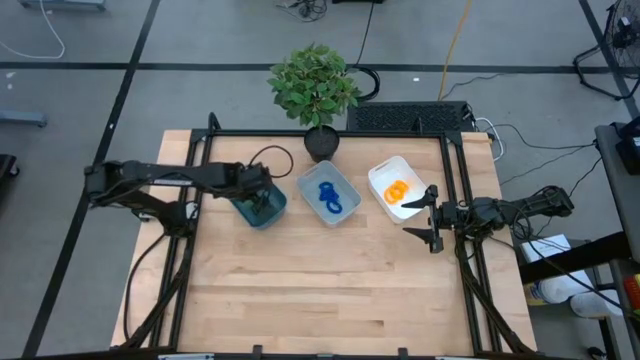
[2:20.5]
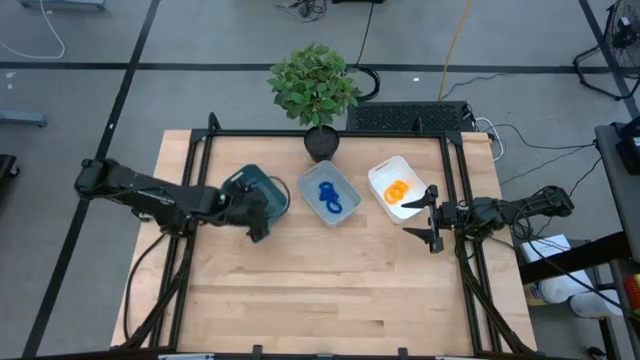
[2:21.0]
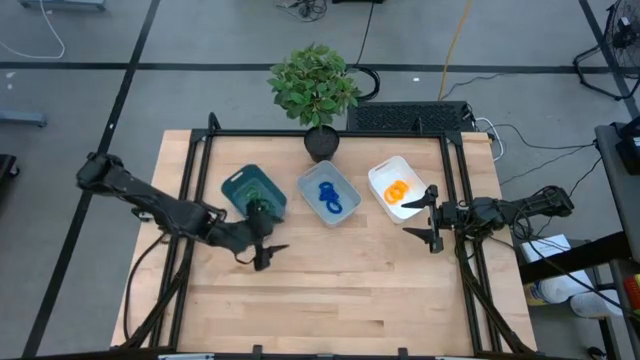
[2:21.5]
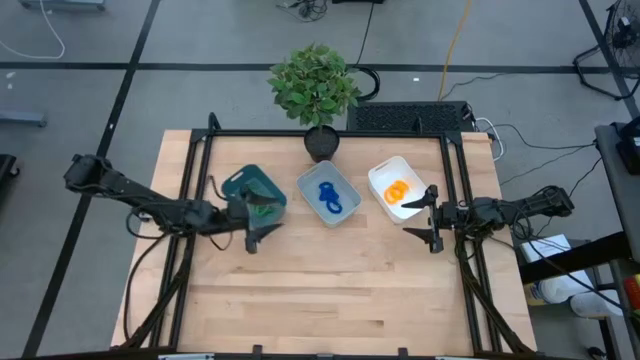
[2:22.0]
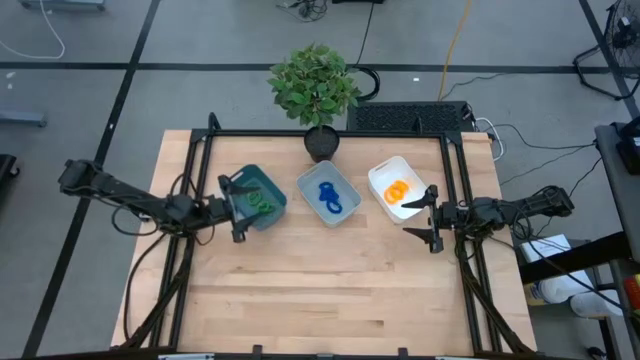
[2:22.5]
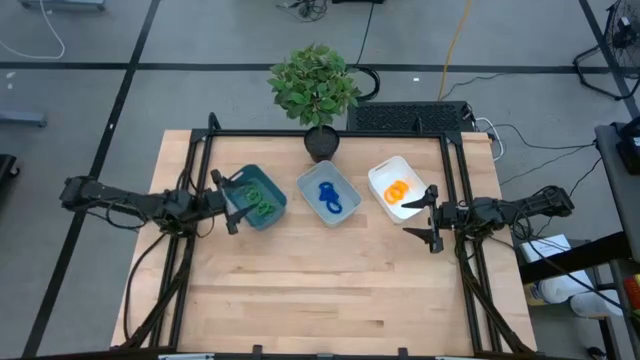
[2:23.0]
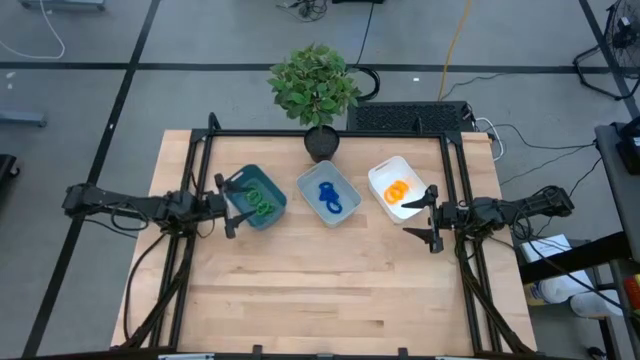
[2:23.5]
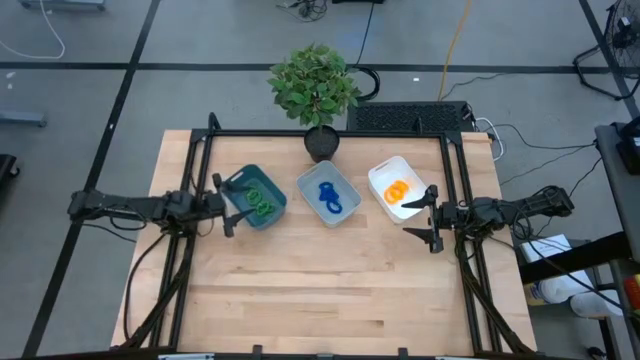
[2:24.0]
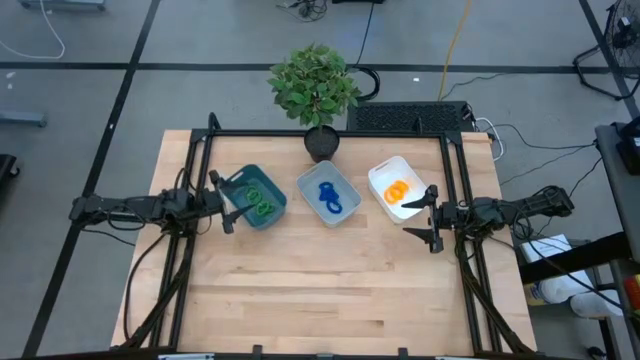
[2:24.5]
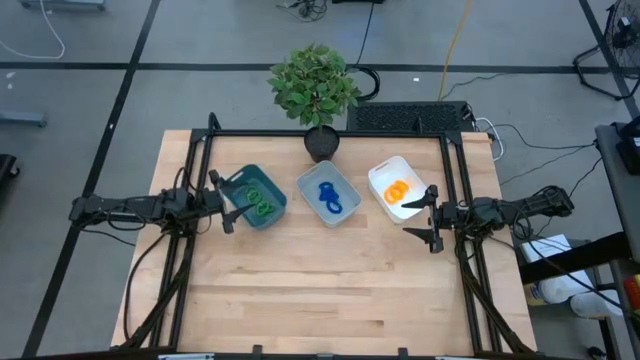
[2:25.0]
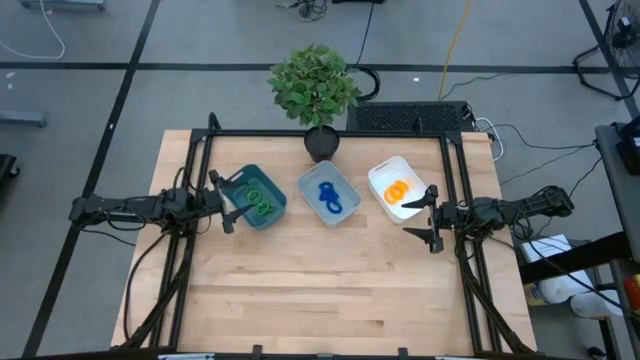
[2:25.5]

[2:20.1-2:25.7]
Task: Sort spring keychains
Return to Home Position

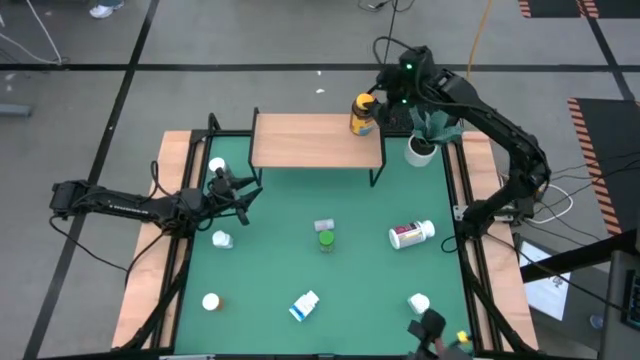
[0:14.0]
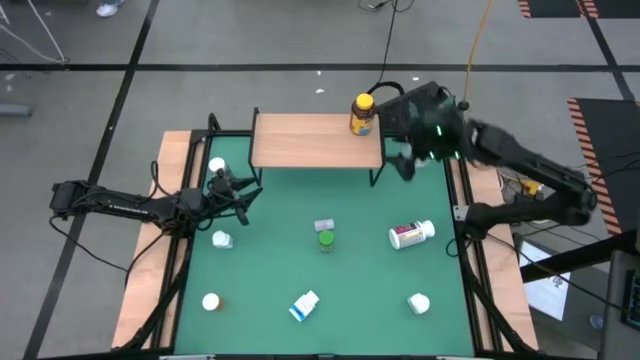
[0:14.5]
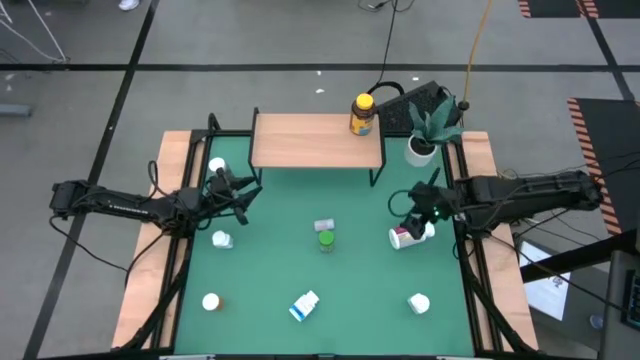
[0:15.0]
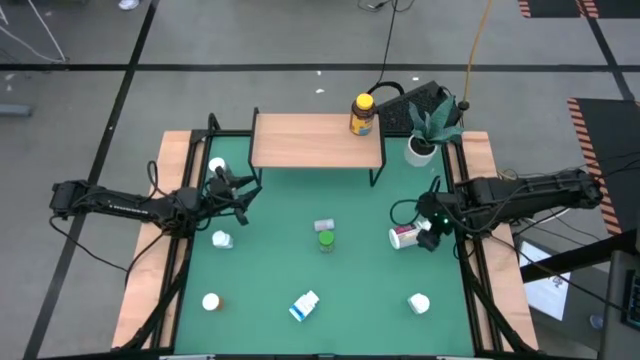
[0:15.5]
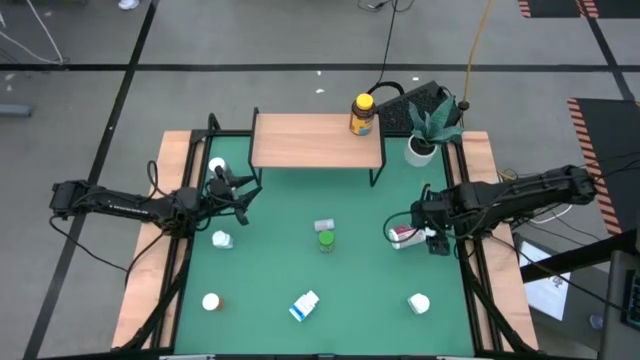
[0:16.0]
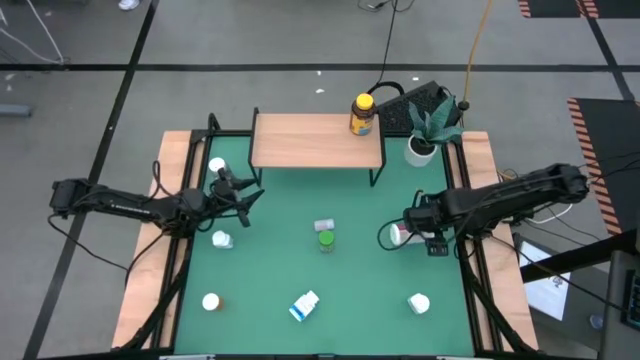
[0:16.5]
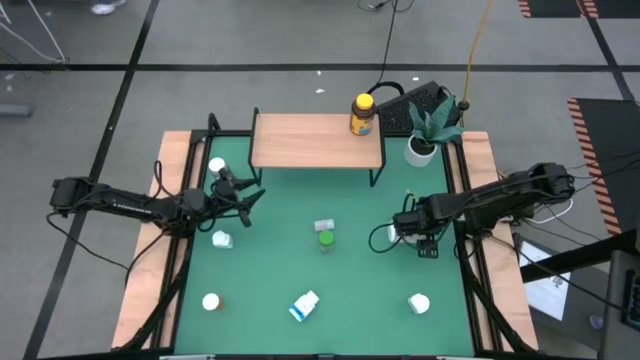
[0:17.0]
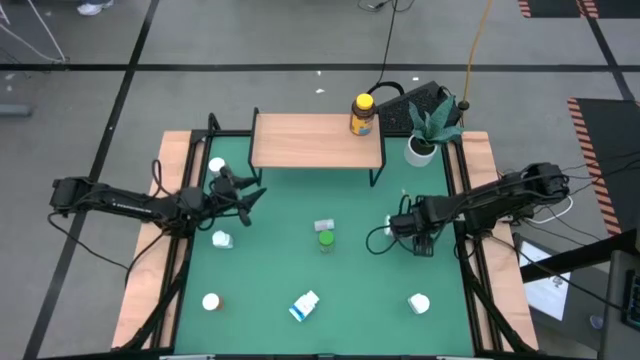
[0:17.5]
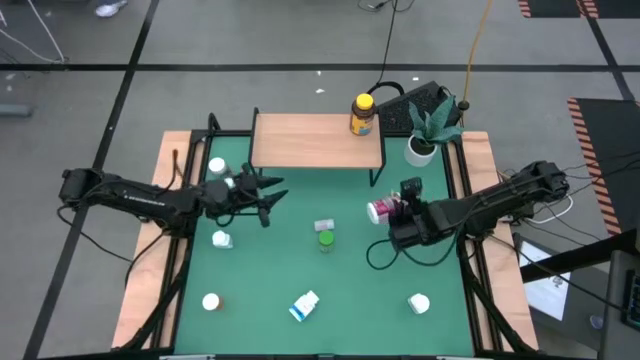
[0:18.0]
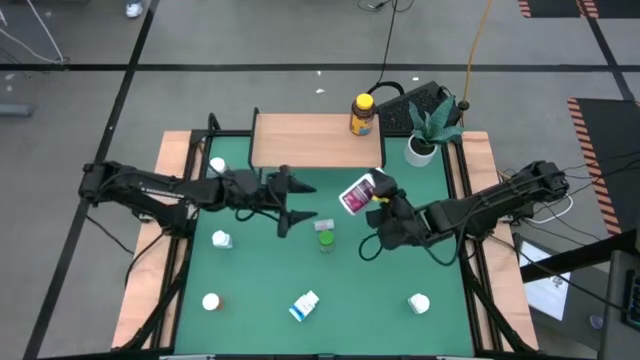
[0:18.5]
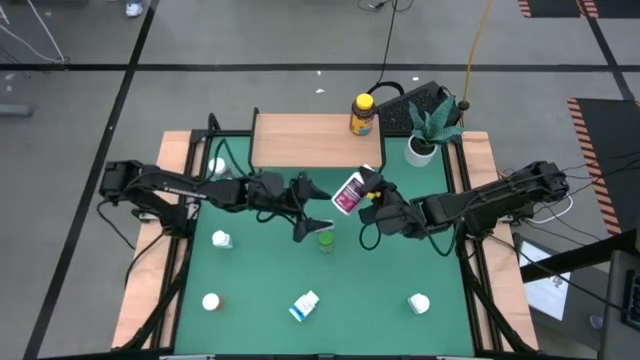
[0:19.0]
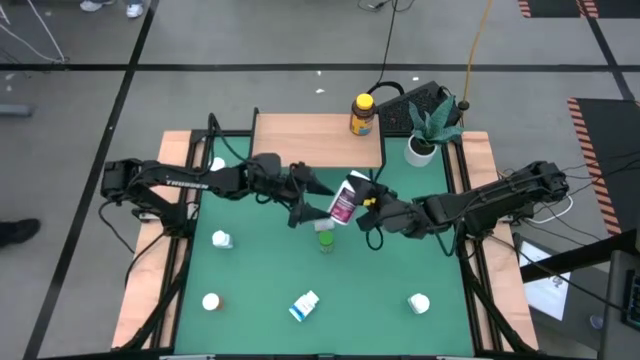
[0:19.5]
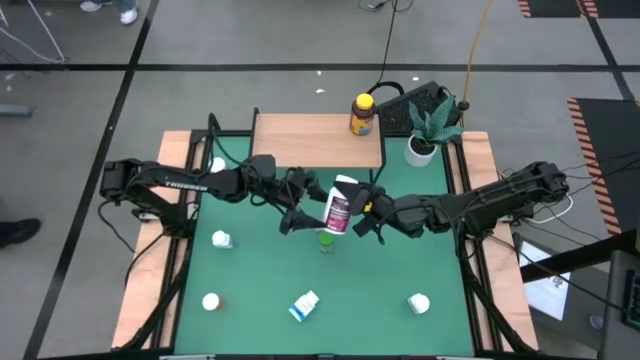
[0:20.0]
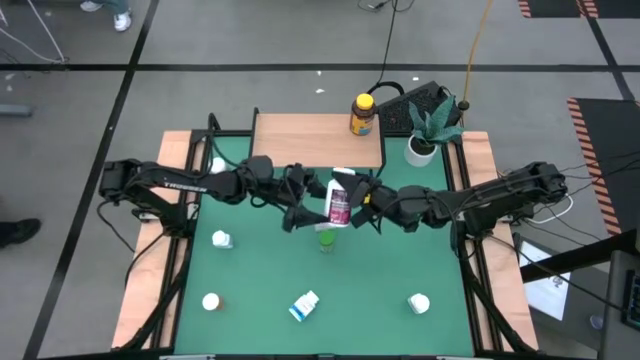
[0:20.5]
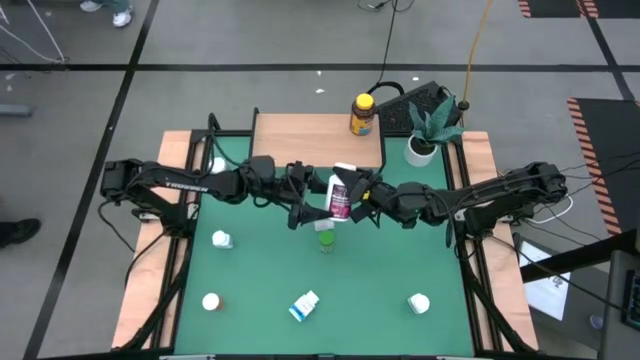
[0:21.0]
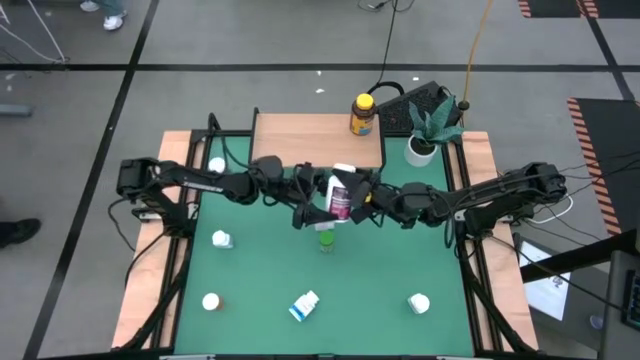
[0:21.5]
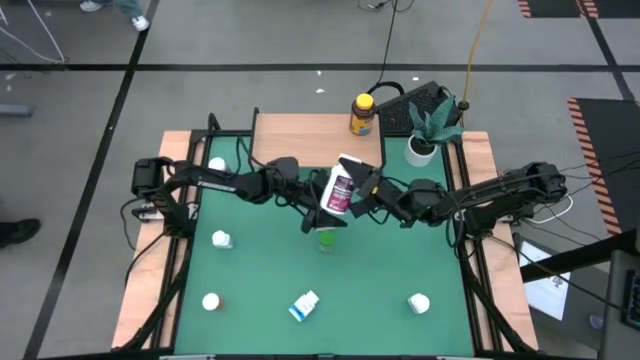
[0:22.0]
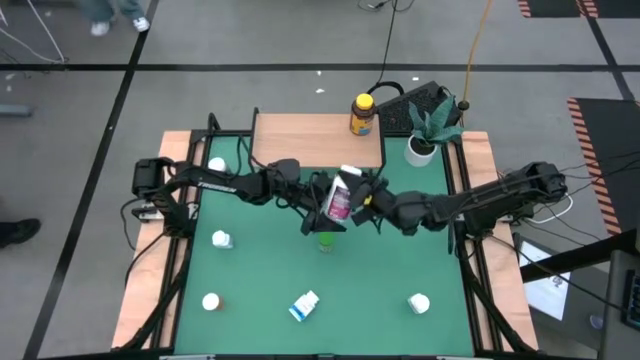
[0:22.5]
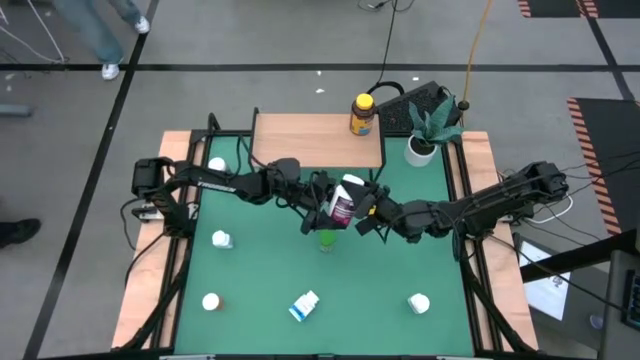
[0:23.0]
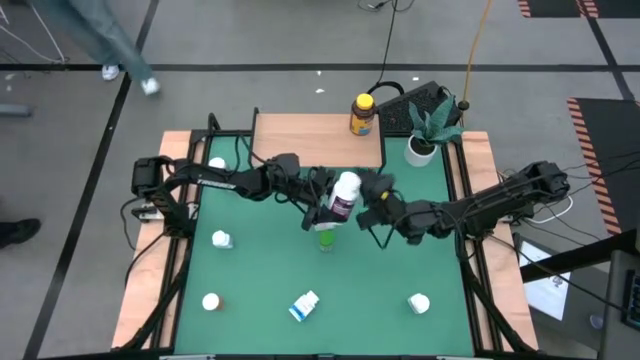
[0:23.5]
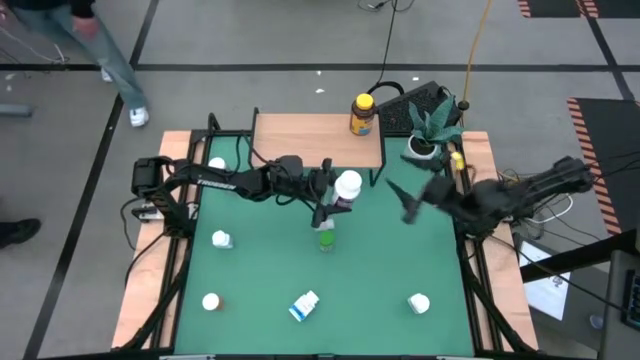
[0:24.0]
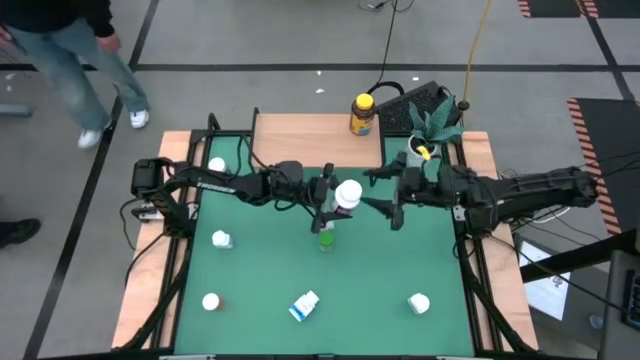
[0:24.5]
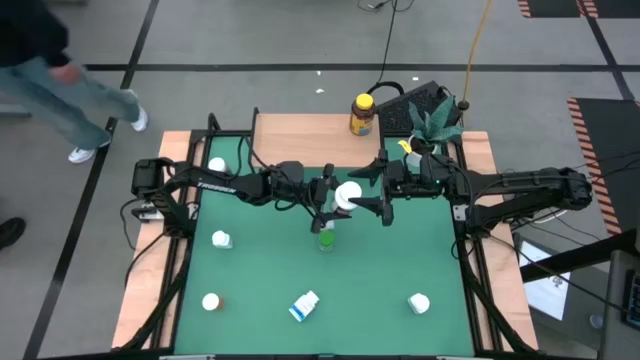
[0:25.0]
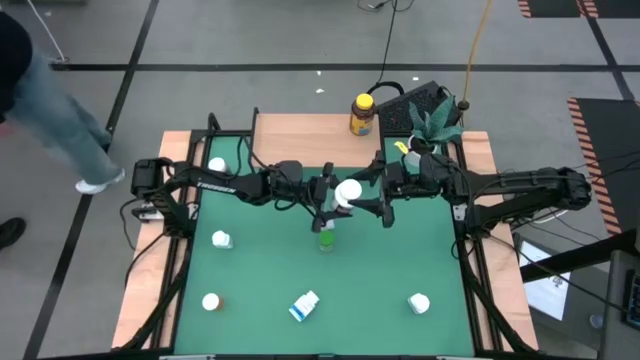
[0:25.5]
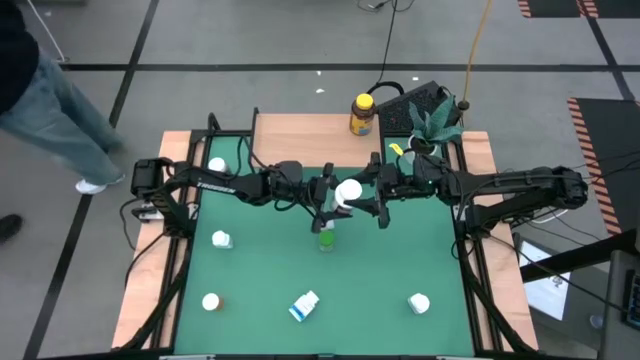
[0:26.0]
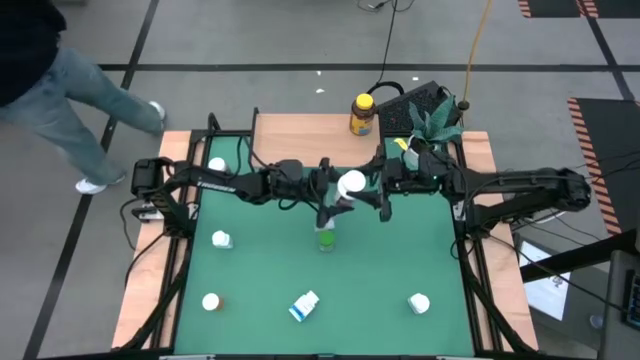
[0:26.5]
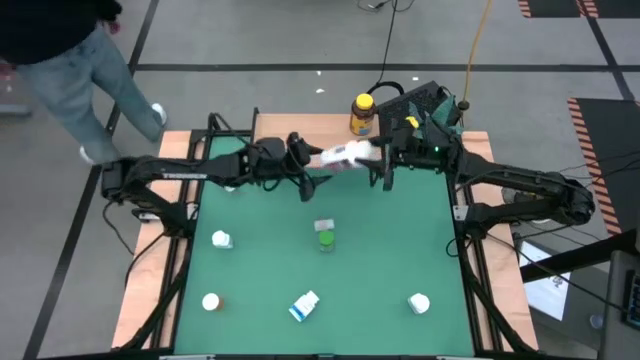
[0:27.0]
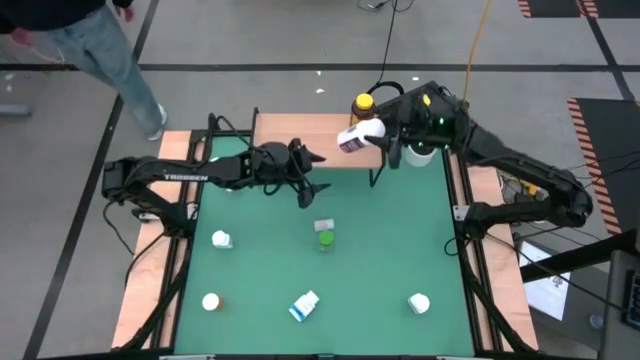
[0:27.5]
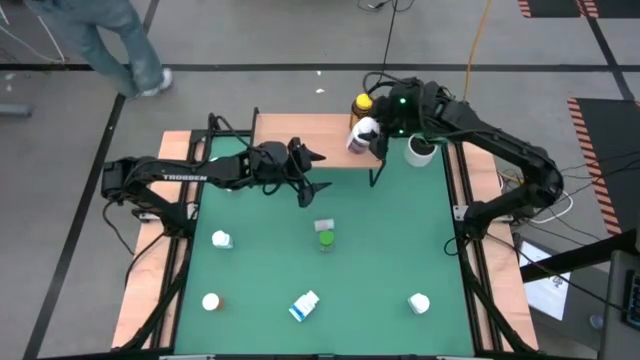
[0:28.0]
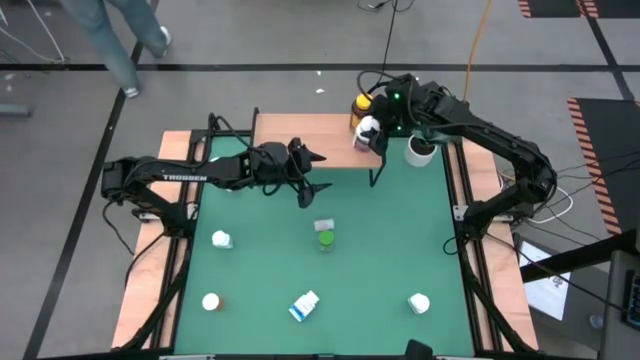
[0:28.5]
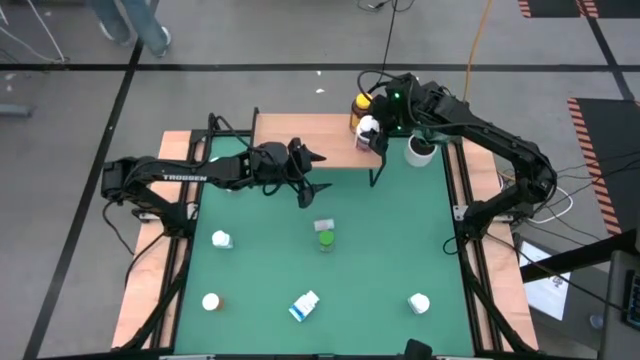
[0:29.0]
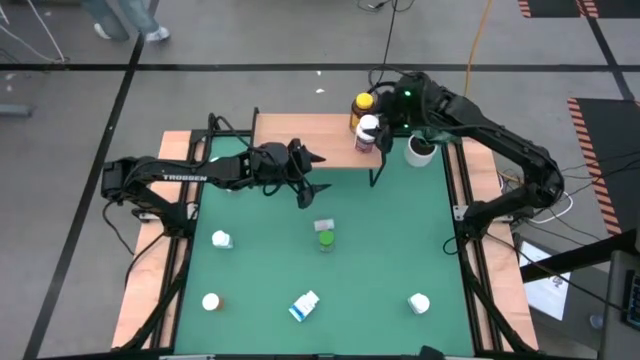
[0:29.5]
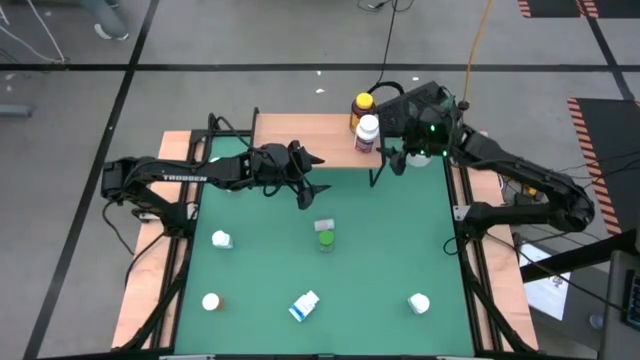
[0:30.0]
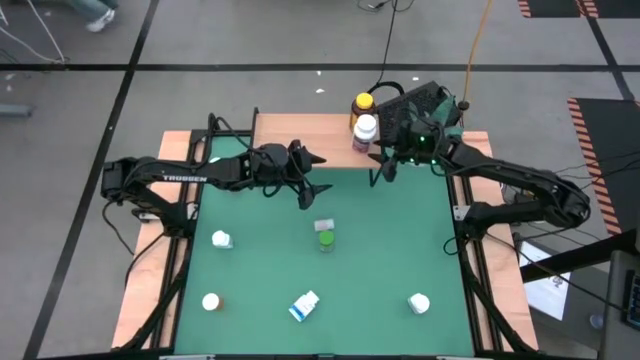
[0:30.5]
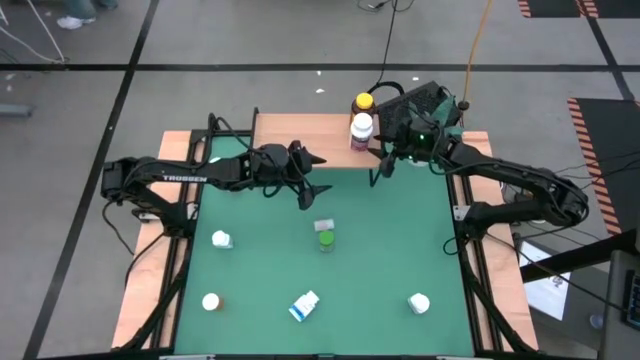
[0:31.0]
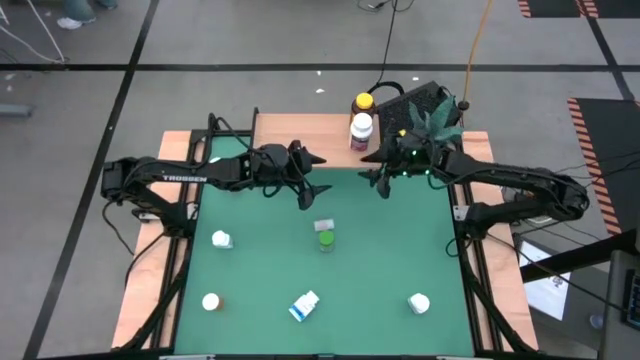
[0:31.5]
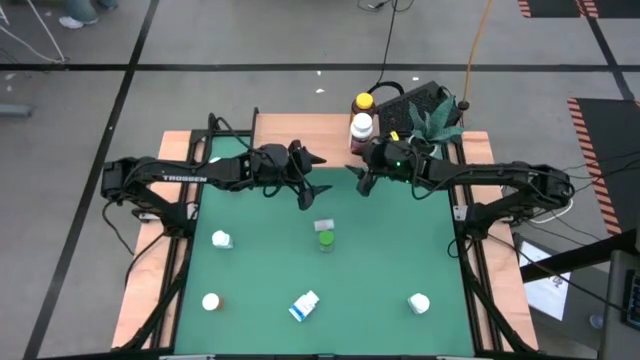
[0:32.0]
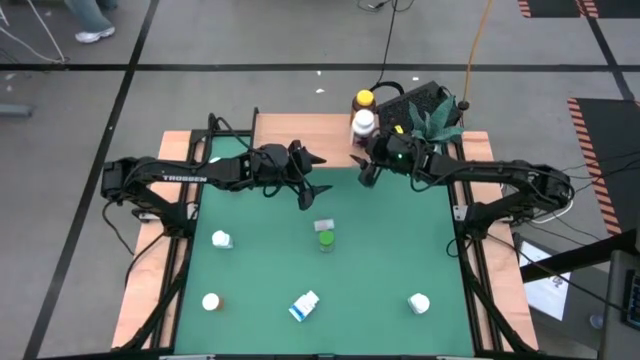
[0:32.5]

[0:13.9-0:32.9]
Task: Pick and place medicine bottles onto shelf by color
Put the purple medicine bottle on the shelf
